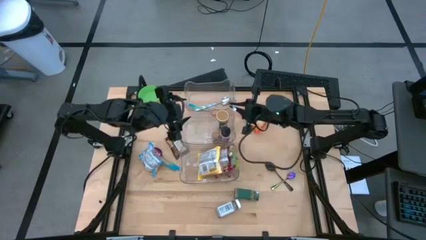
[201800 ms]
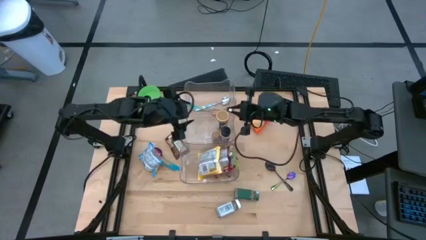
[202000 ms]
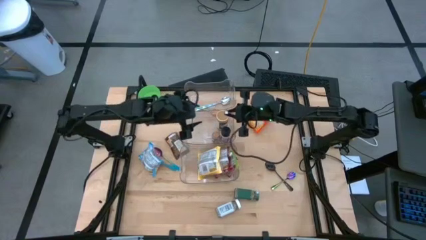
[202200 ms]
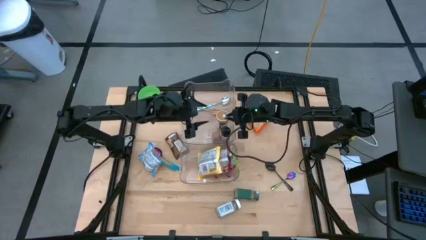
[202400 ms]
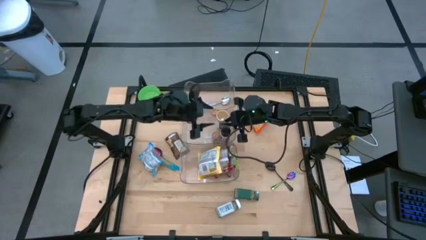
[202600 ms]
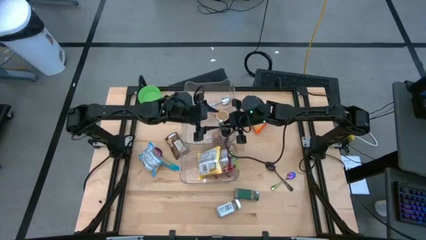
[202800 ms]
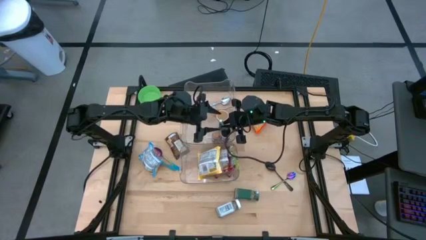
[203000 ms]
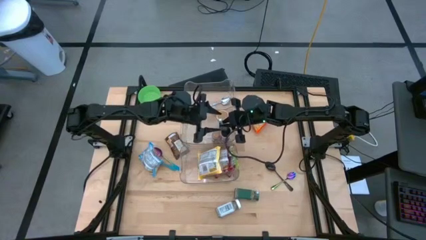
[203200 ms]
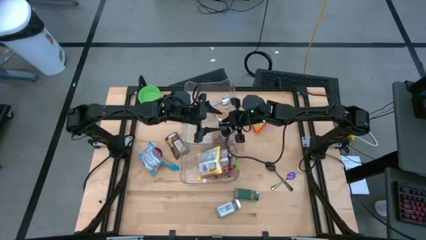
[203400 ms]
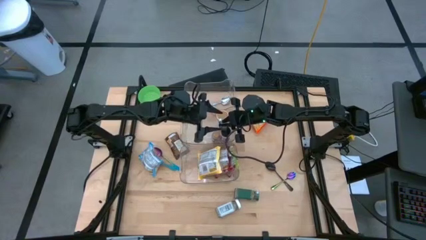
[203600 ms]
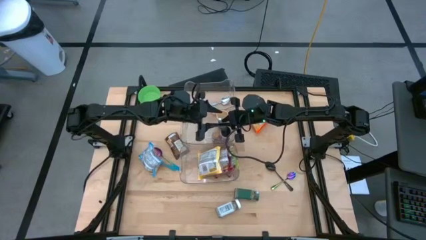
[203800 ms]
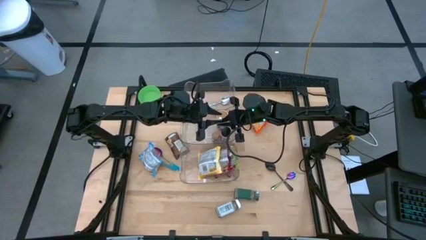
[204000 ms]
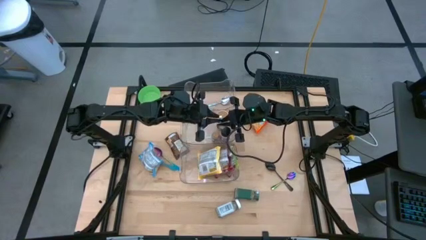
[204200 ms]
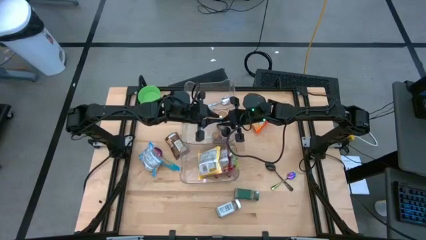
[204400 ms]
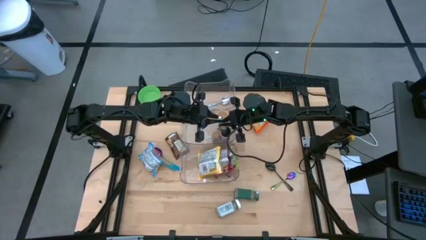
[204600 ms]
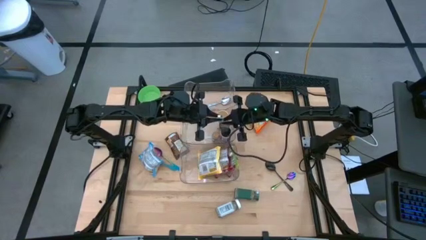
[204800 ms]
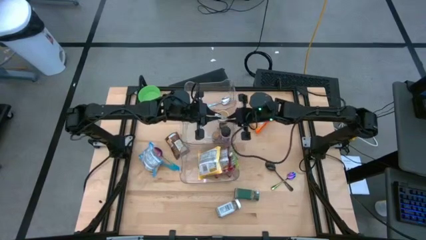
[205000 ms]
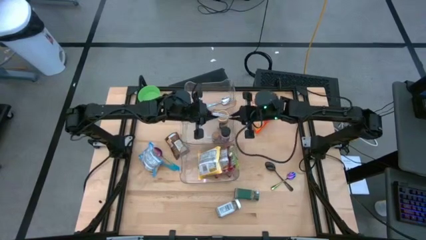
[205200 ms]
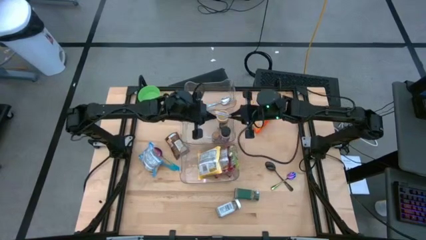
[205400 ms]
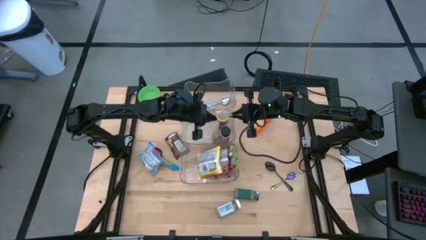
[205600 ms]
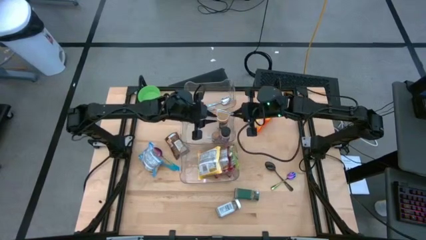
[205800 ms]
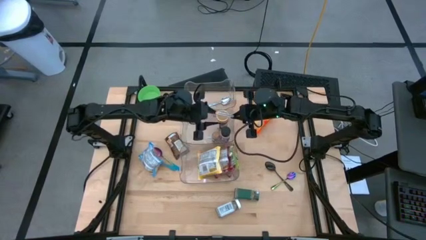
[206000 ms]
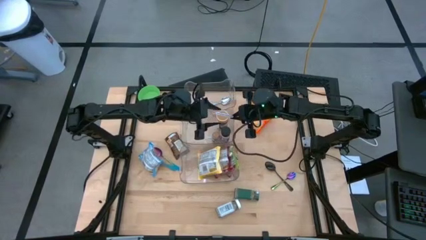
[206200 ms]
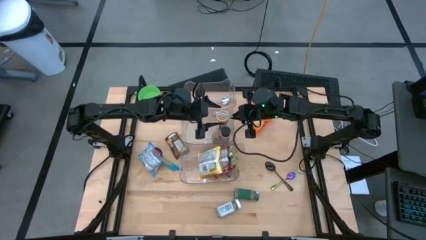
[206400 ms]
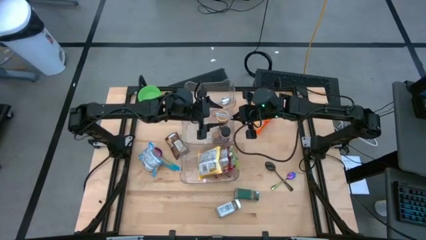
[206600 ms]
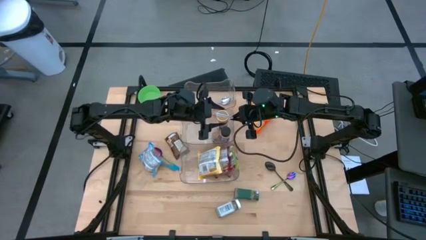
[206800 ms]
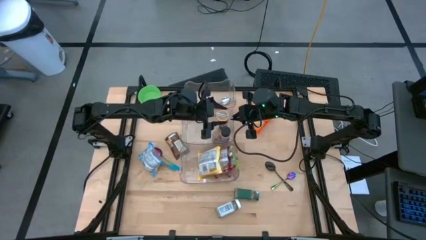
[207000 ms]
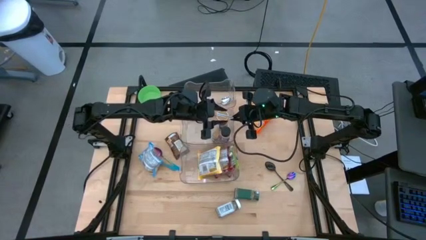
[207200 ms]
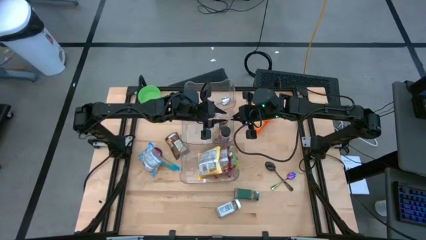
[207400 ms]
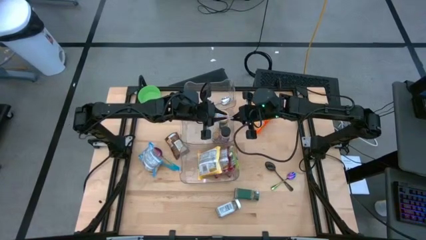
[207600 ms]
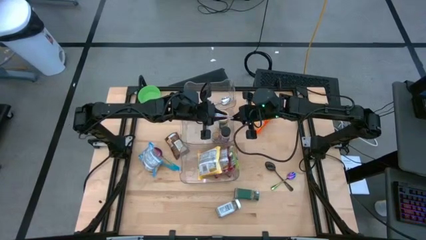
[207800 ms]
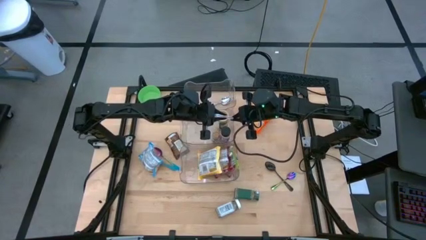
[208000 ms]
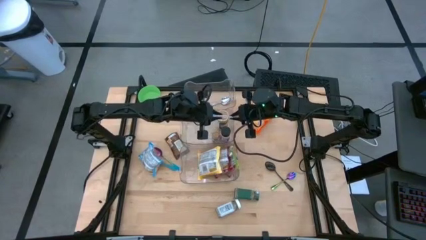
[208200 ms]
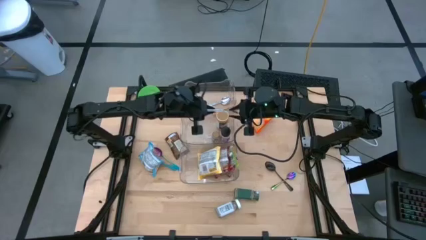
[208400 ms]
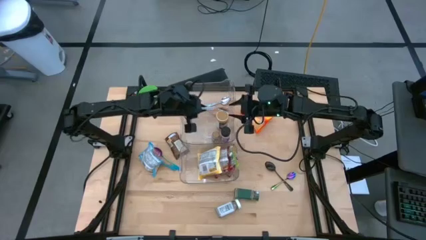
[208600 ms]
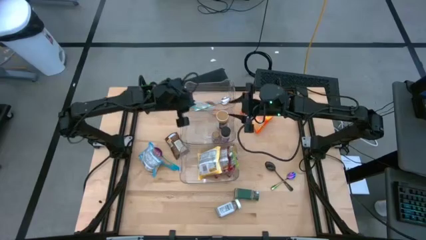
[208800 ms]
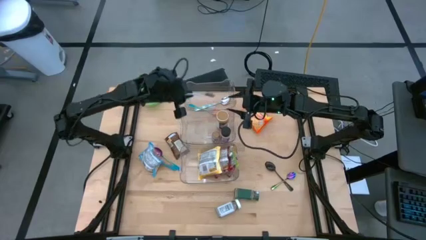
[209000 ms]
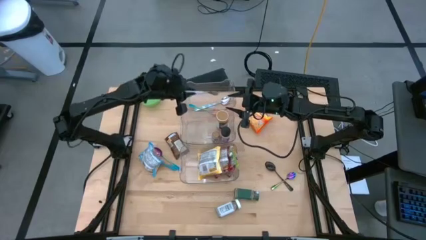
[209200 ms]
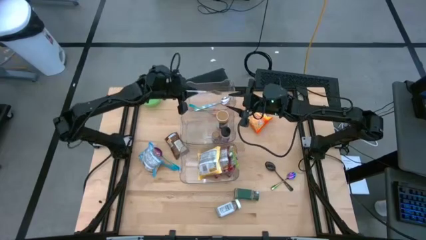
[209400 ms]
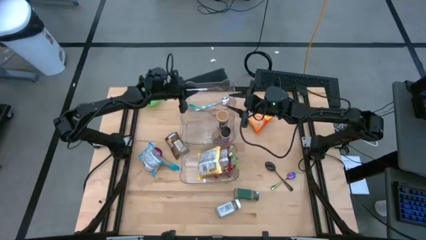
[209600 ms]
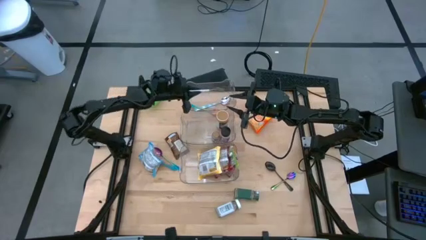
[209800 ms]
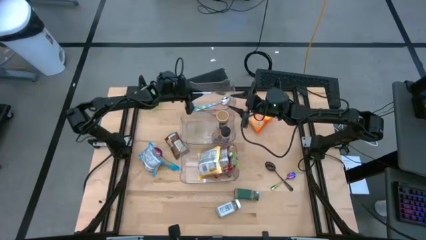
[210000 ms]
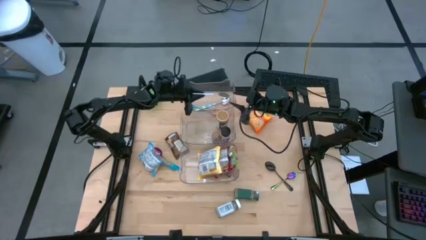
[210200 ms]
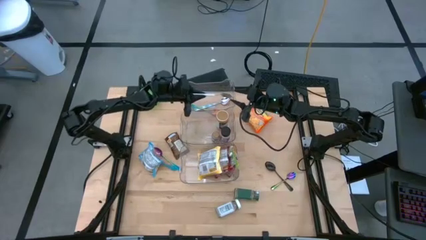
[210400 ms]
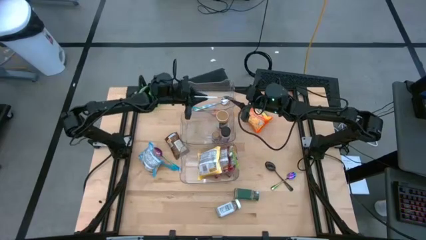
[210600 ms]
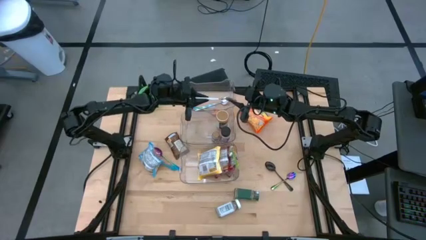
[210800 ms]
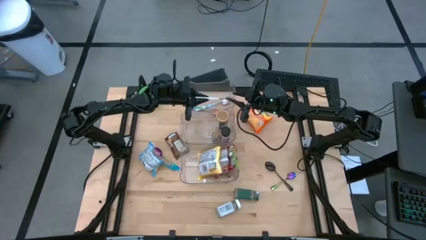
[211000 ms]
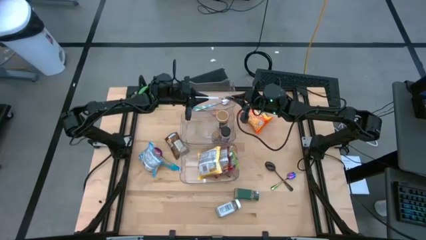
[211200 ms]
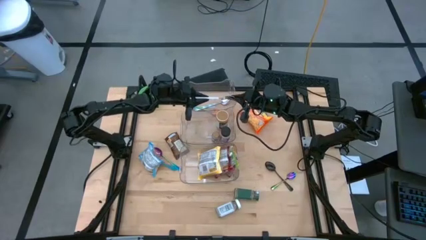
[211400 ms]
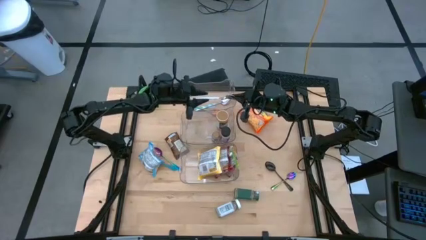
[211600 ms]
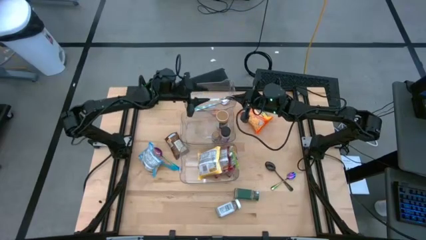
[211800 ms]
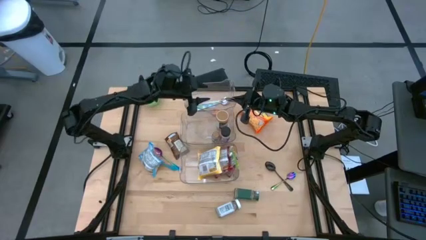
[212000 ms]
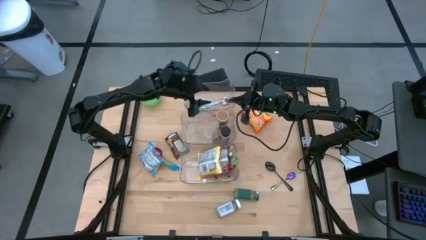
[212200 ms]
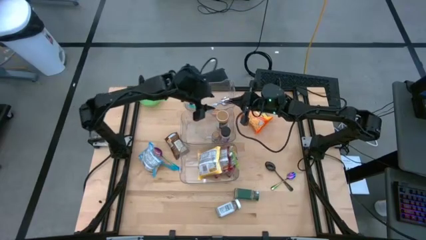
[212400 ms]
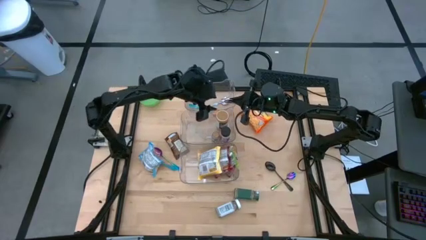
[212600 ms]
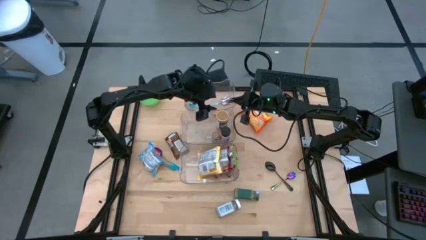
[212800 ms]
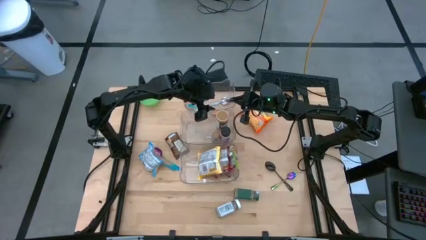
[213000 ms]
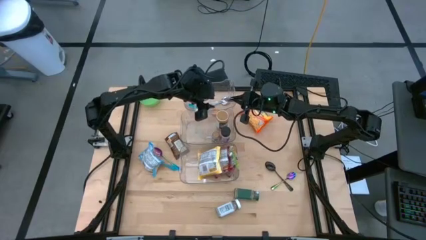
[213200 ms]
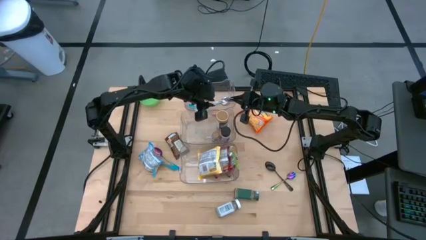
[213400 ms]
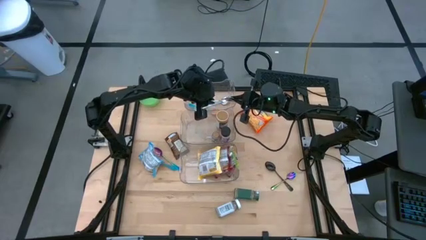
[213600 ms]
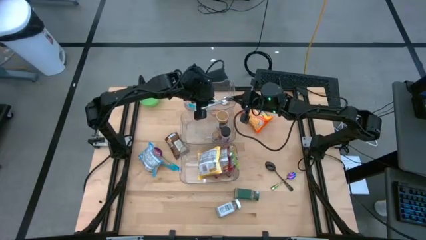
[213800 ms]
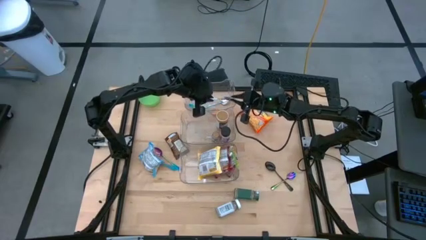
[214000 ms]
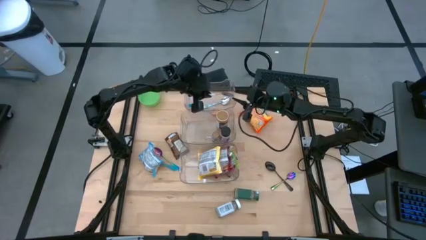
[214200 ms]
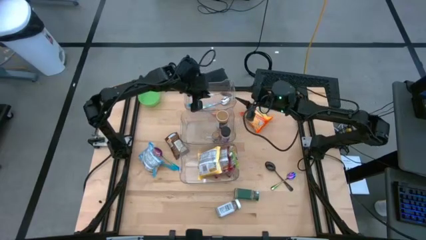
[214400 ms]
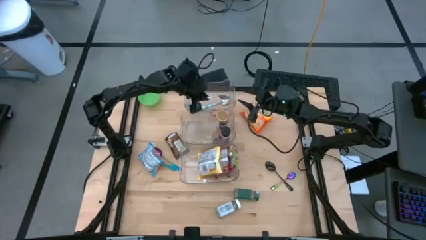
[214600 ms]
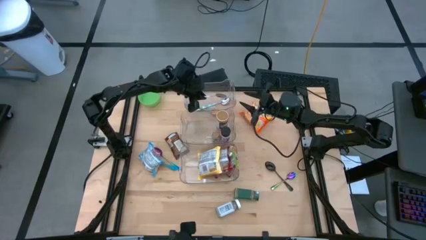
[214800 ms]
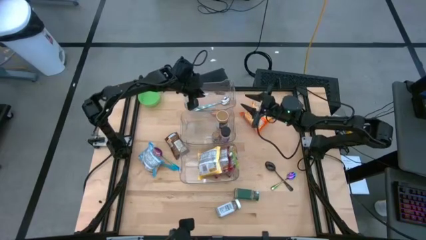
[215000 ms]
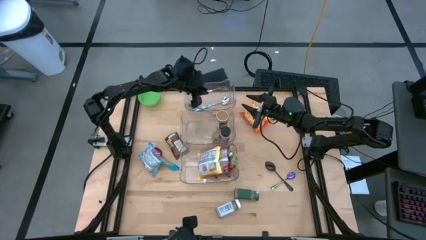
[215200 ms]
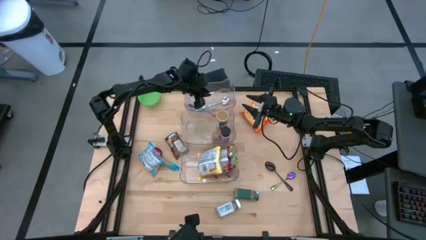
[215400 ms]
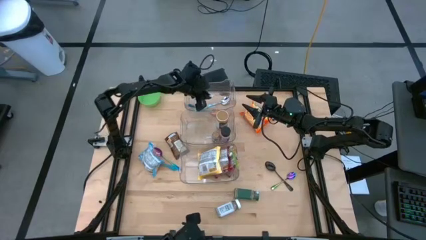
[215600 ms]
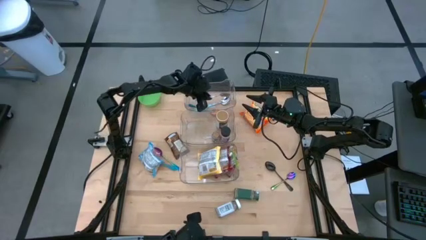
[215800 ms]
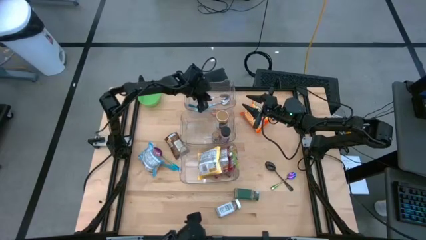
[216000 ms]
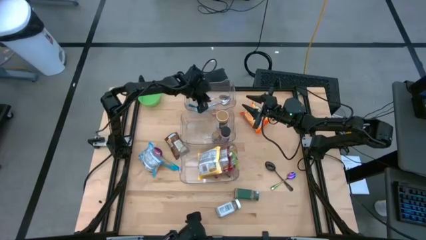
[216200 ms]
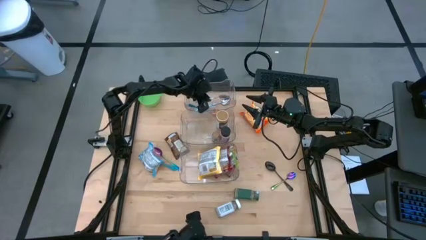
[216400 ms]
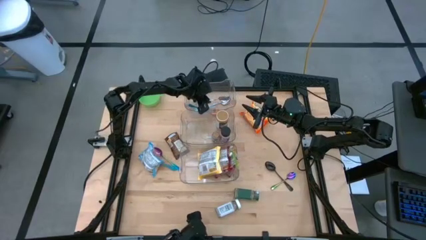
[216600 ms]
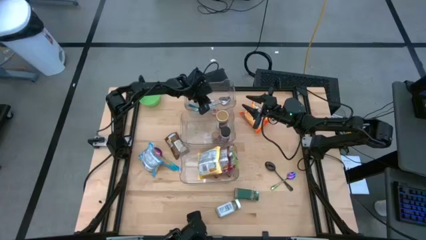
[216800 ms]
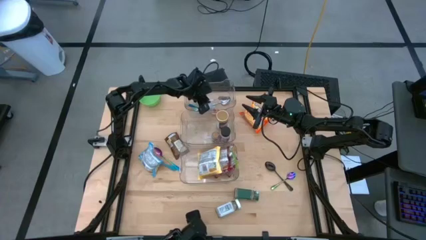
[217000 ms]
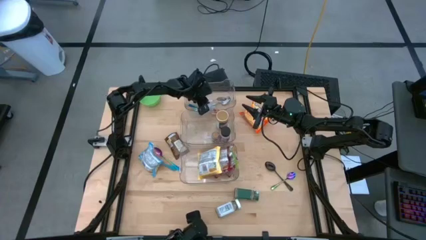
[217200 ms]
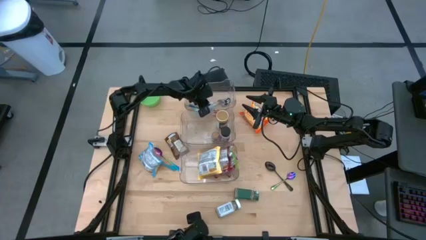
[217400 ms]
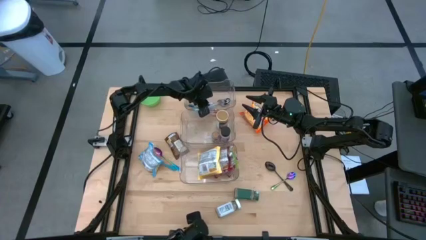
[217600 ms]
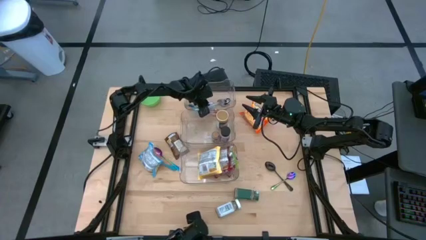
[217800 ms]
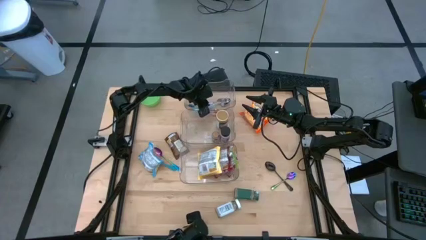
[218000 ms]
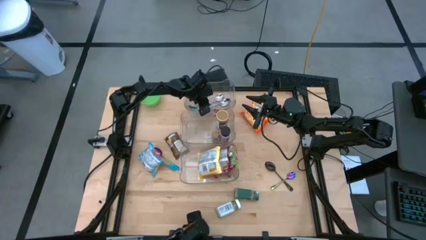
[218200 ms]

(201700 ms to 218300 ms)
Task: Pick & Place Food Item
Put the white patterned spoon into the top transparent bin
